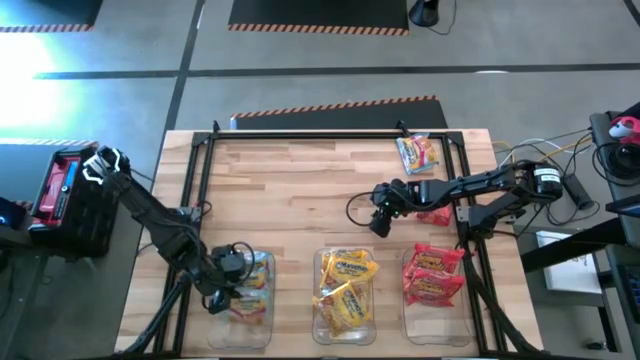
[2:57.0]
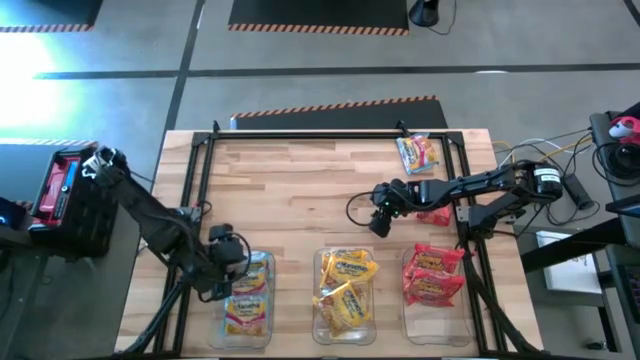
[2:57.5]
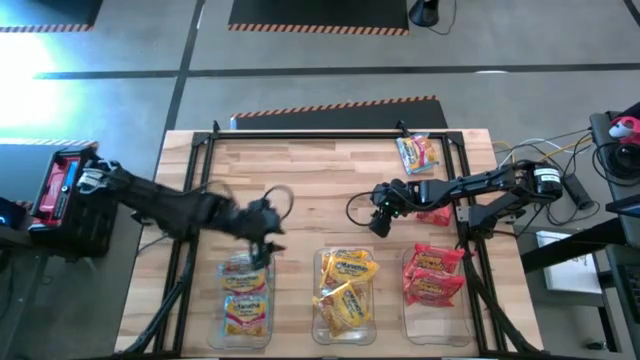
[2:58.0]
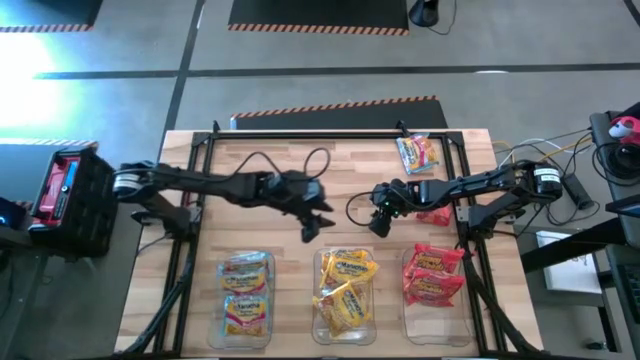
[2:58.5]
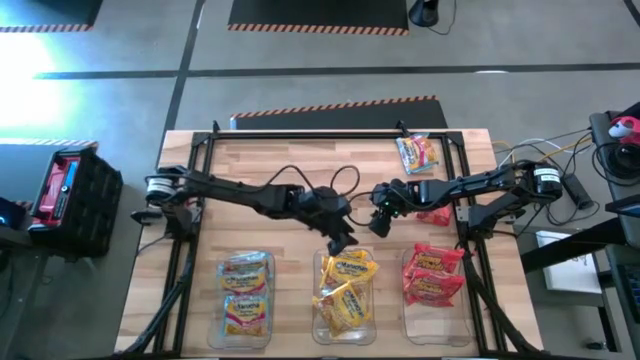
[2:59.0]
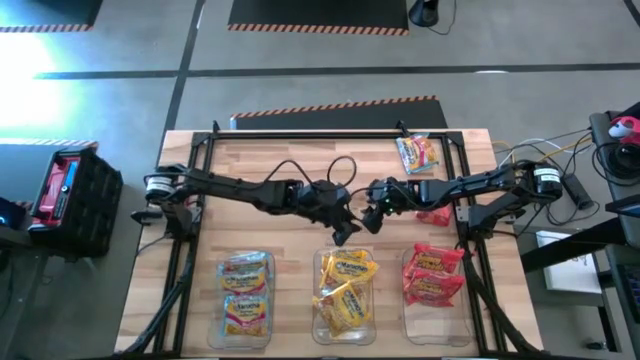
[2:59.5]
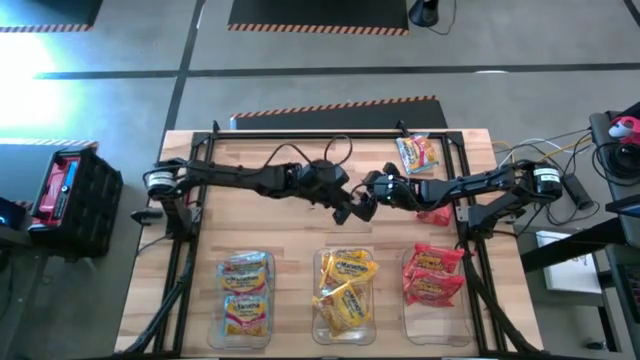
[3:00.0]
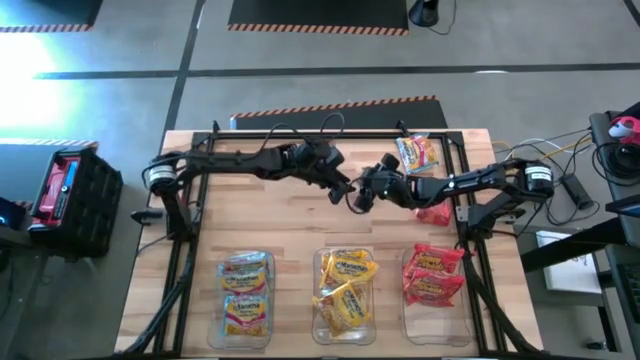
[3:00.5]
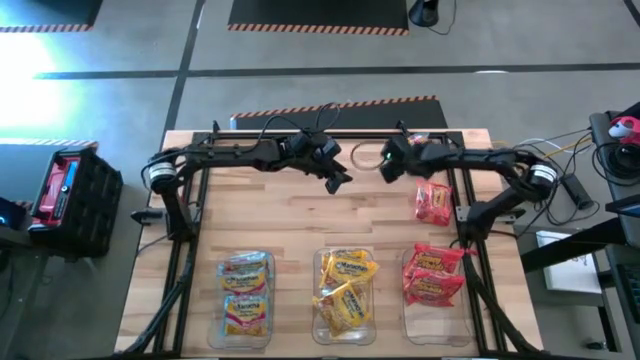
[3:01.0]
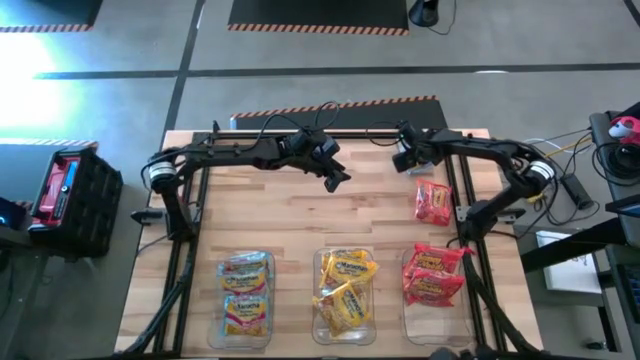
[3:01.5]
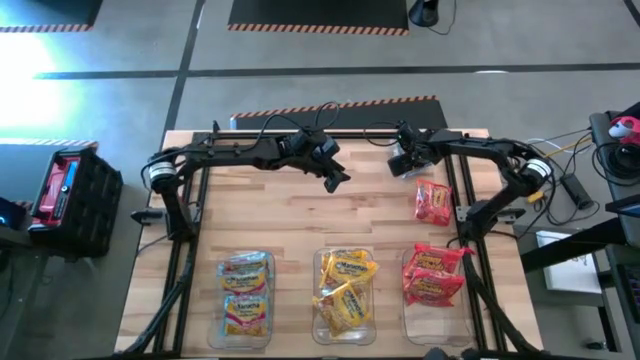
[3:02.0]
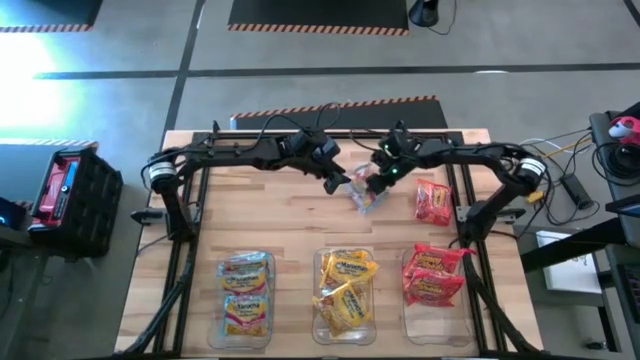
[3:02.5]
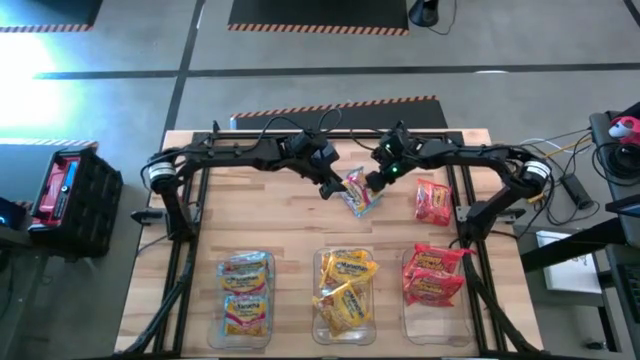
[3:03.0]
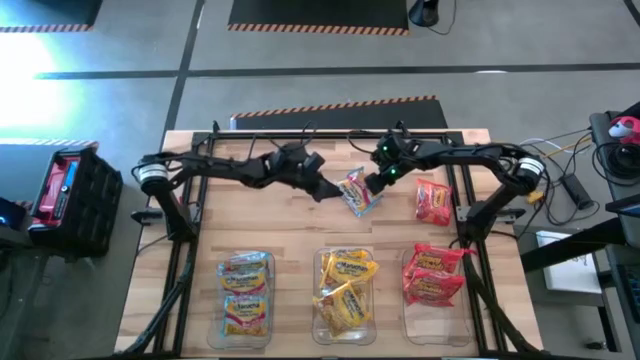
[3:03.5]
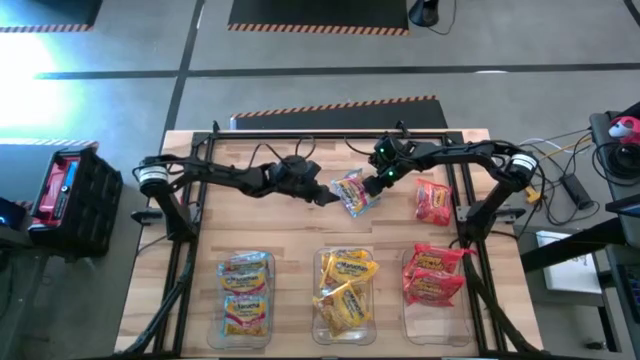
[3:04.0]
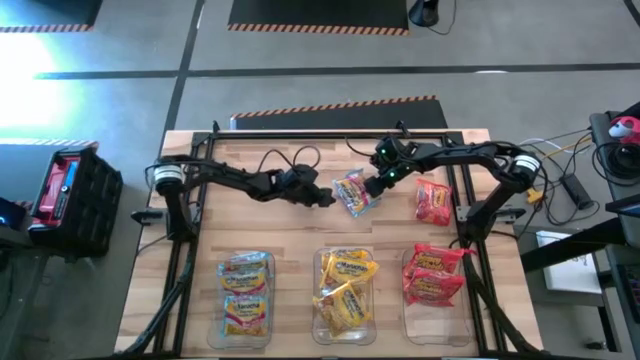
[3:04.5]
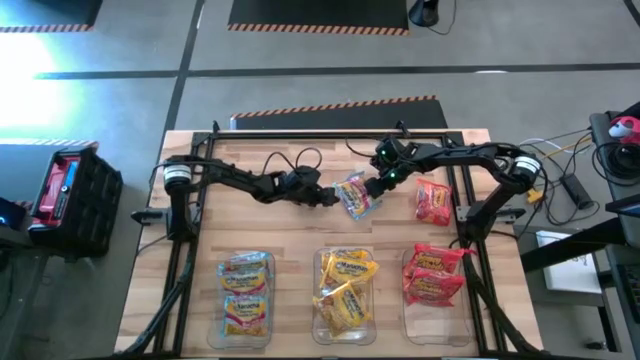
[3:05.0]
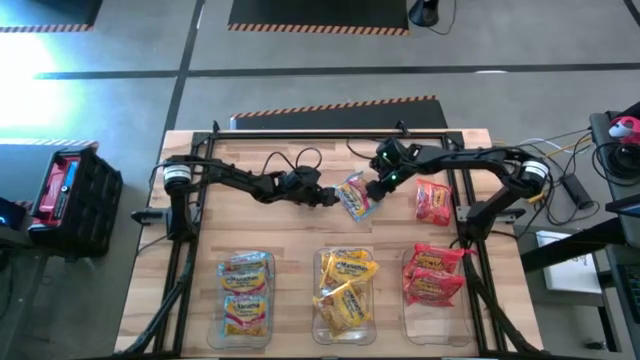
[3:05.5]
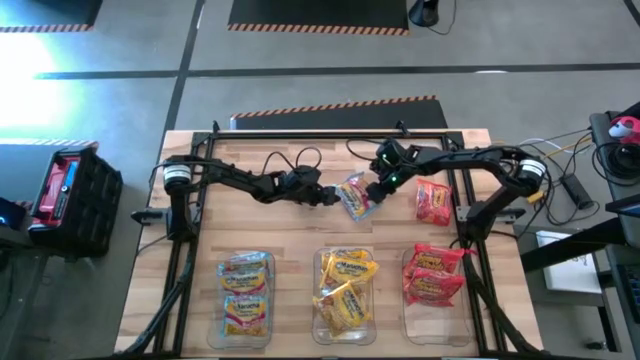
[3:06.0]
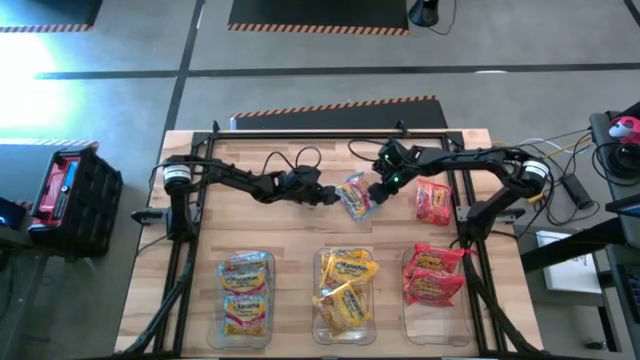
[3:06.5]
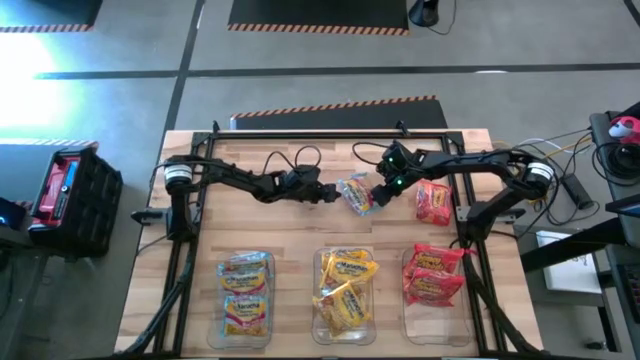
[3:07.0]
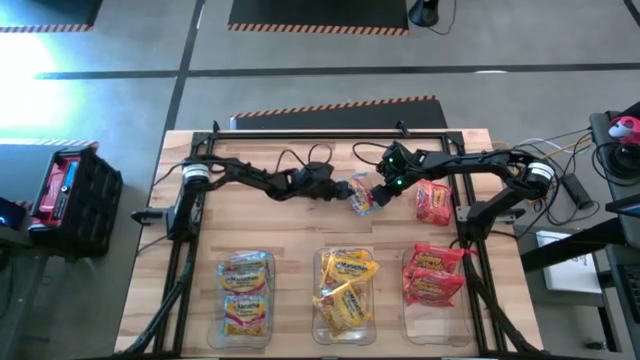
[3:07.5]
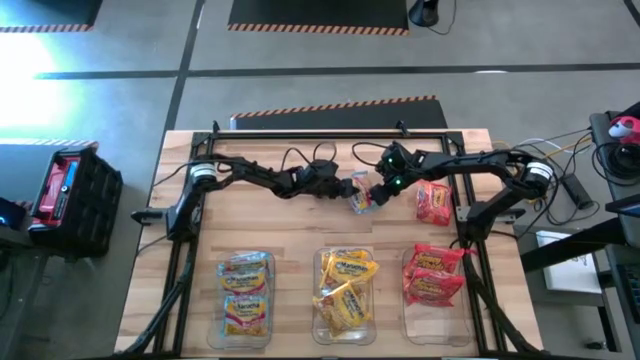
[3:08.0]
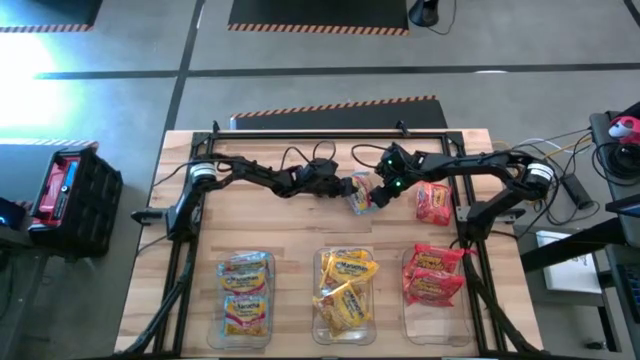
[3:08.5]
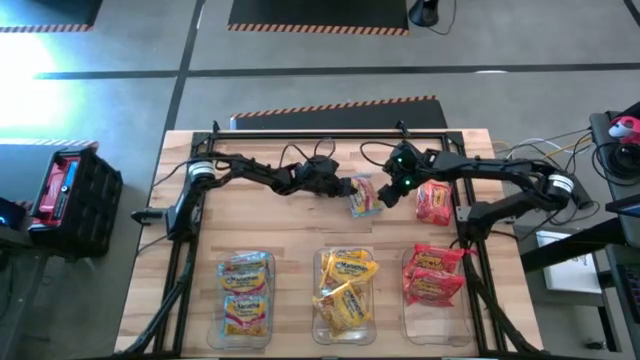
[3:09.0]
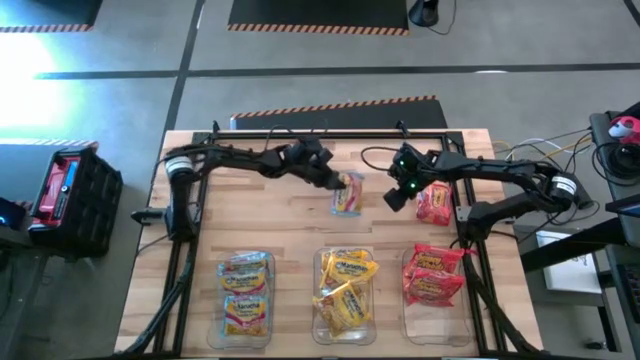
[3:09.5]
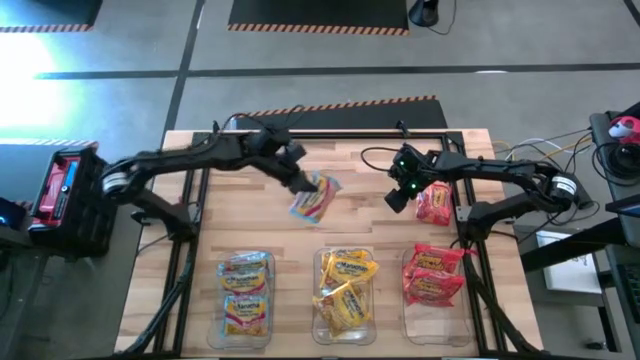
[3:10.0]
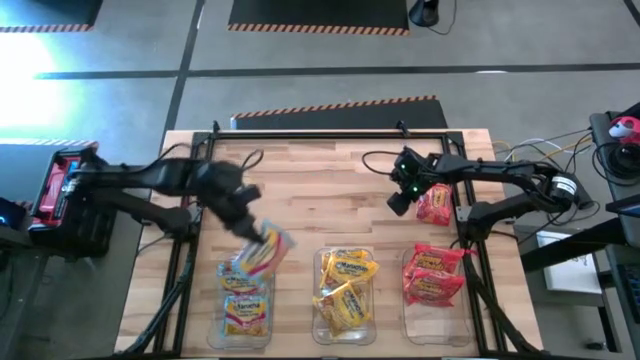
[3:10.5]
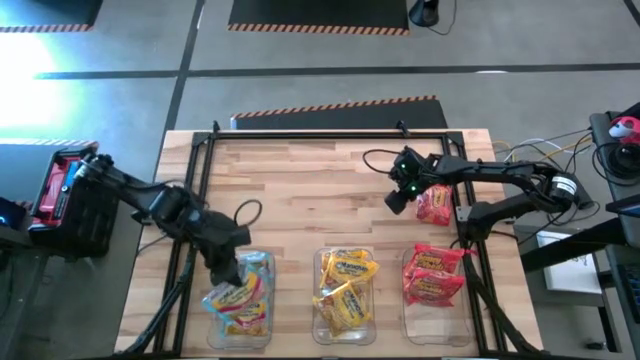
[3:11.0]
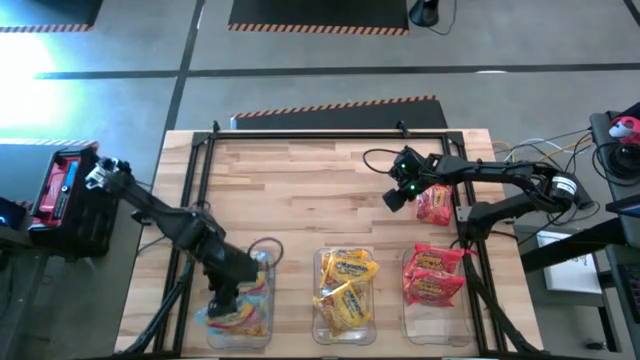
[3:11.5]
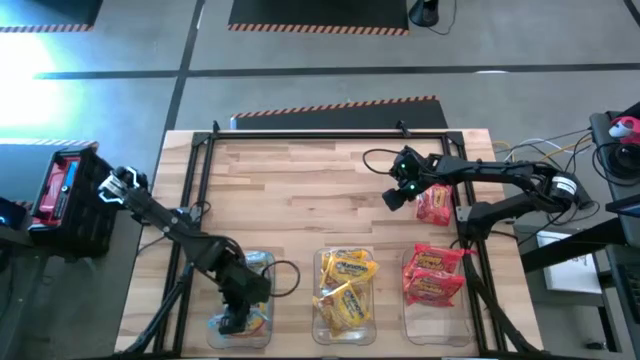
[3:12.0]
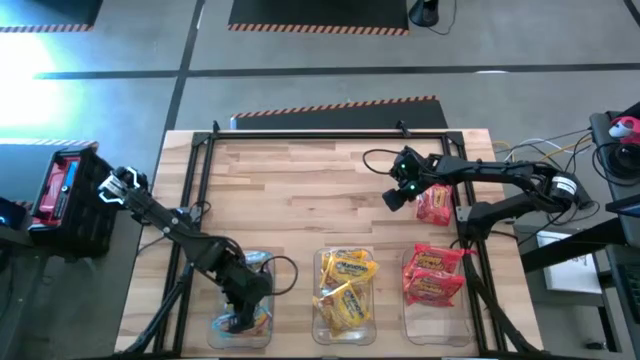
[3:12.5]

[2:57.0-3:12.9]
Task: Sort Maruchan noodles
Put the blue noodle pack into the left transparent bin

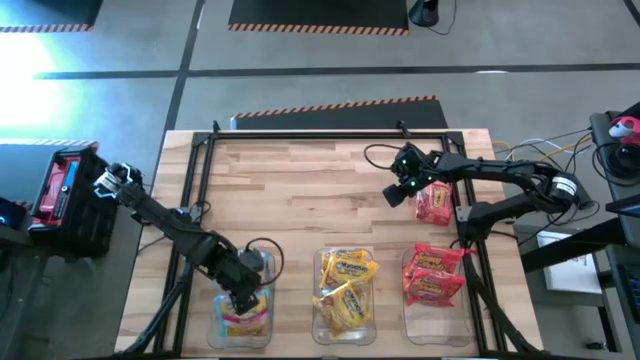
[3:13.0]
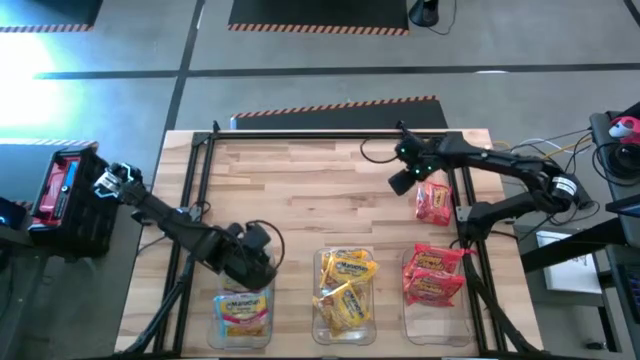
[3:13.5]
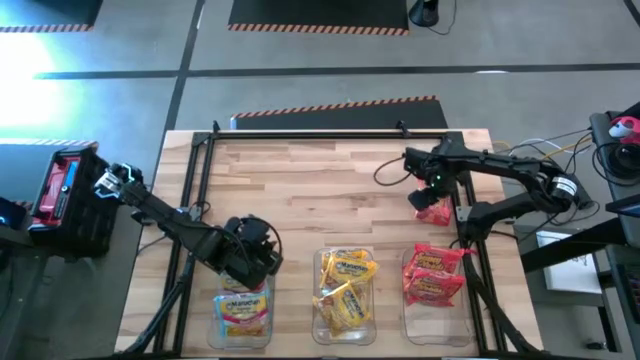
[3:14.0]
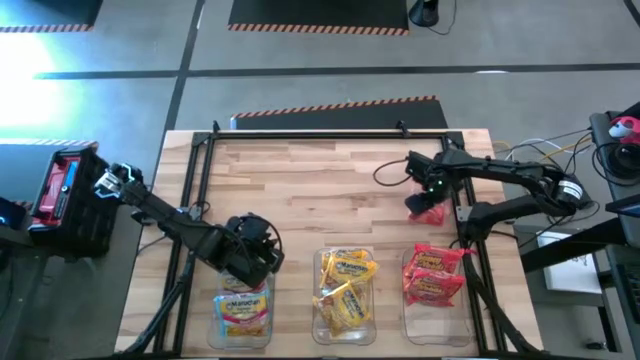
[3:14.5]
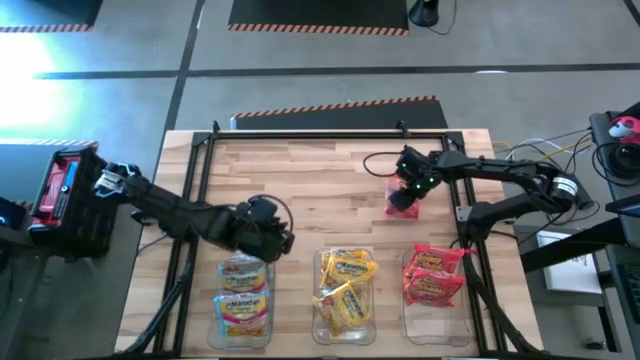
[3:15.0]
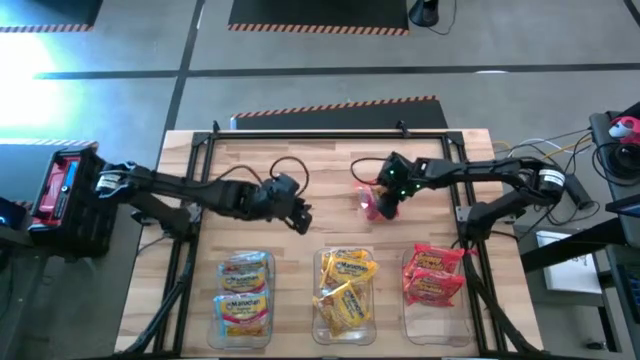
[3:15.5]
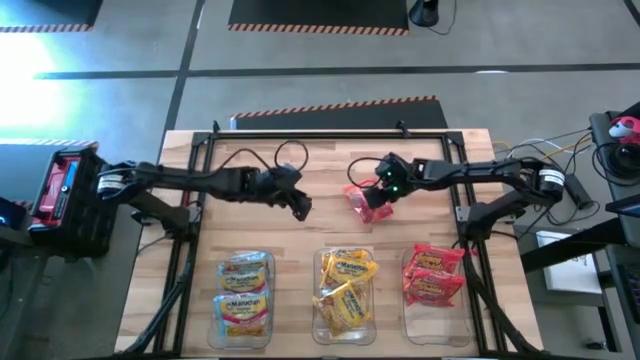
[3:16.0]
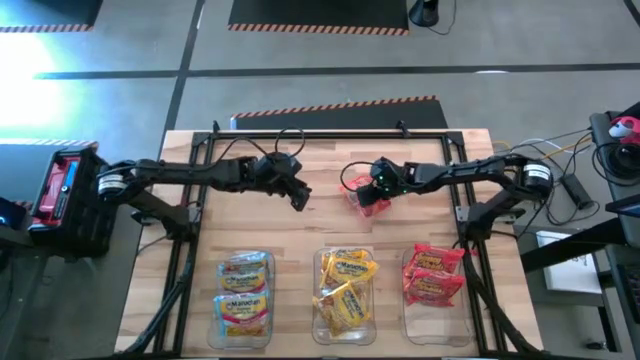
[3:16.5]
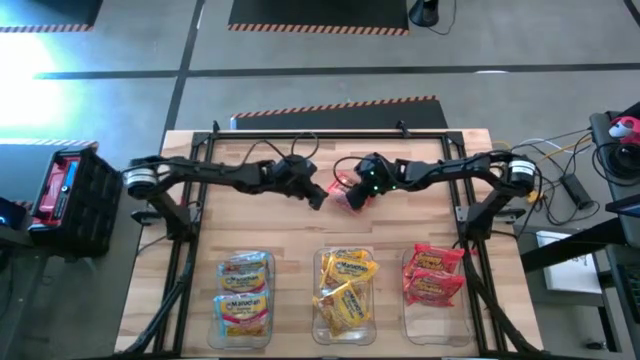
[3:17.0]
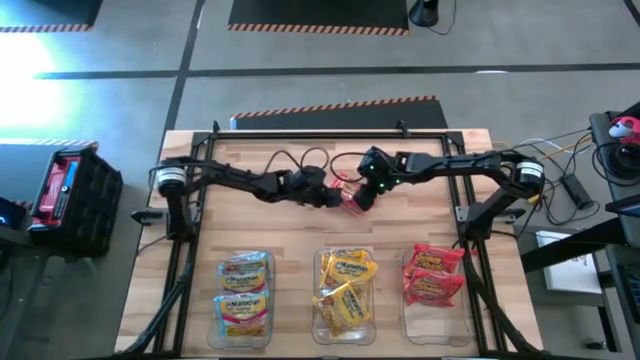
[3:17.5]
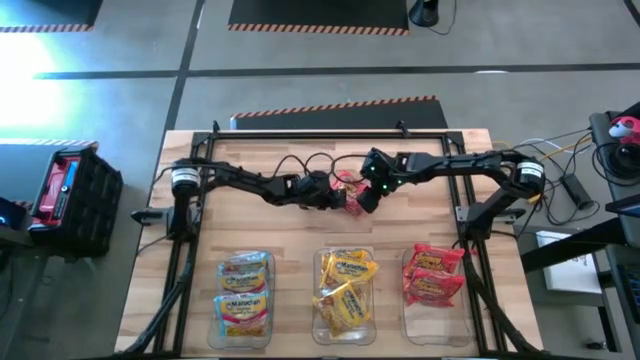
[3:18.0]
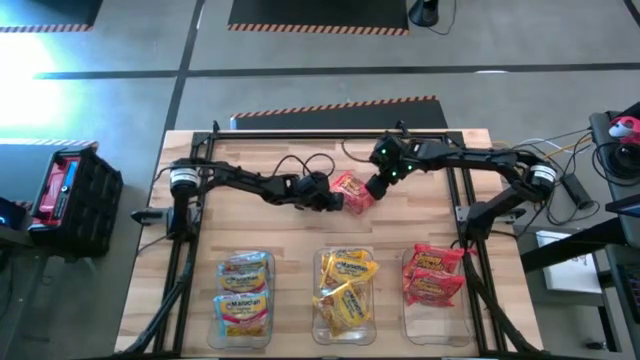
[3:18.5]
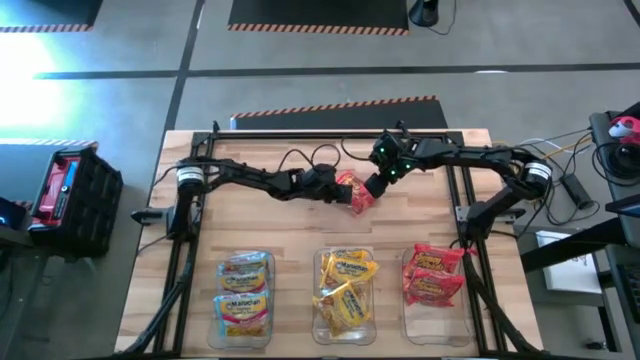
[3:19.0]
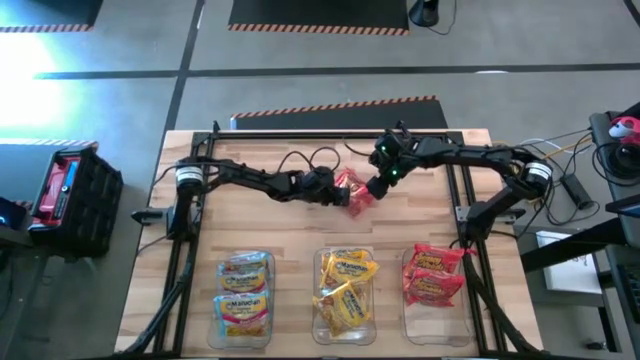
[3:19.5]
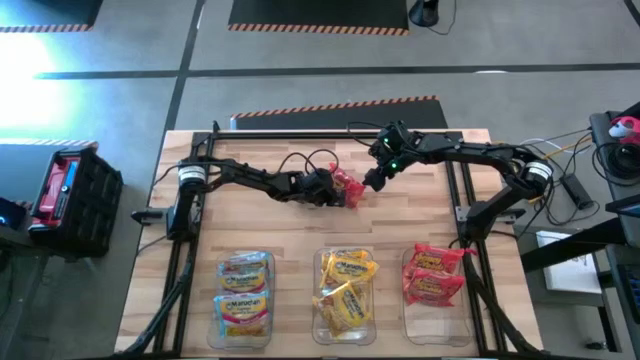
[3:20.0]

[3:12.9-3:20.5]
Put the red noodle pack into the right transparent bin
